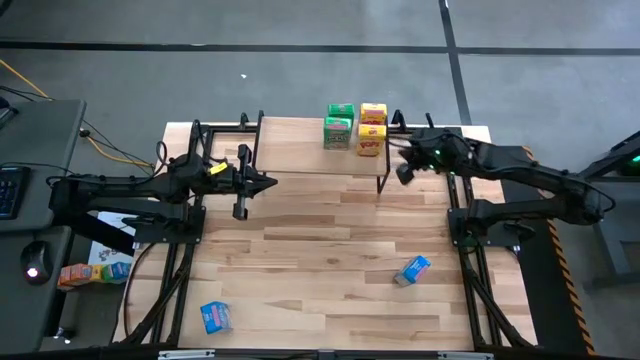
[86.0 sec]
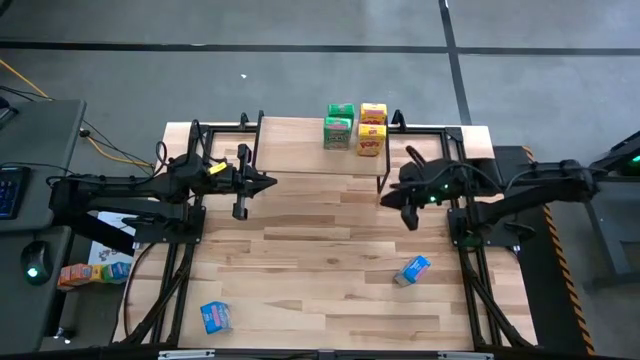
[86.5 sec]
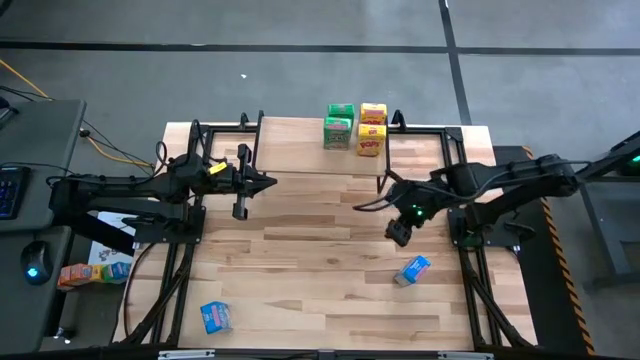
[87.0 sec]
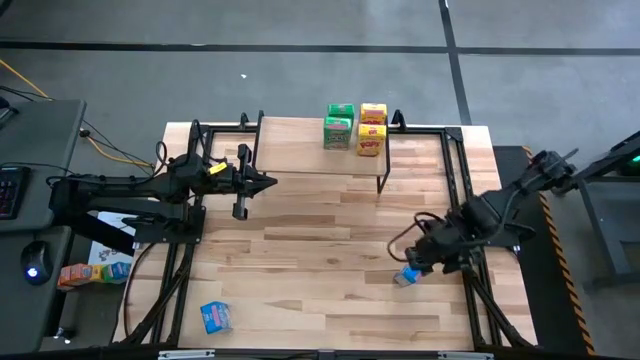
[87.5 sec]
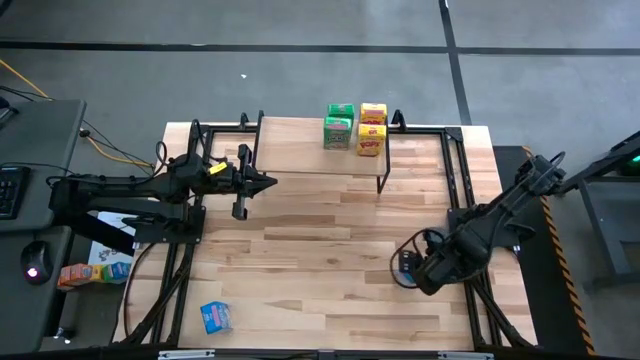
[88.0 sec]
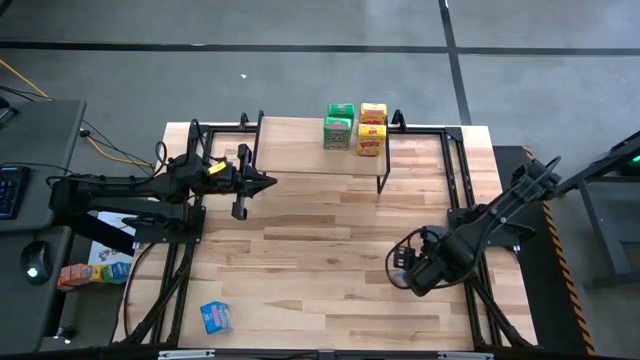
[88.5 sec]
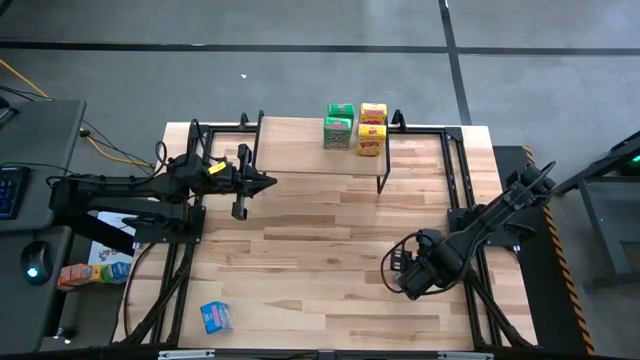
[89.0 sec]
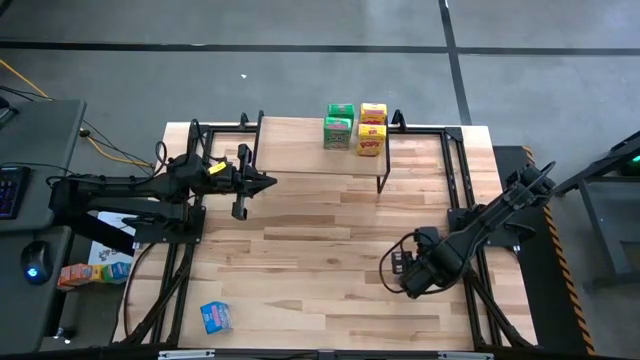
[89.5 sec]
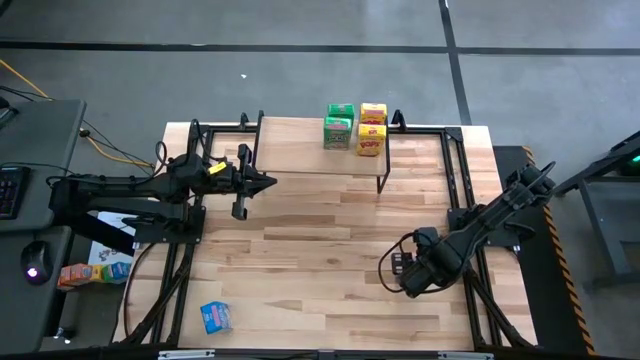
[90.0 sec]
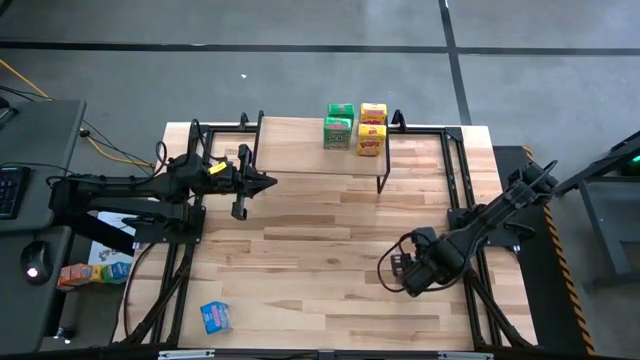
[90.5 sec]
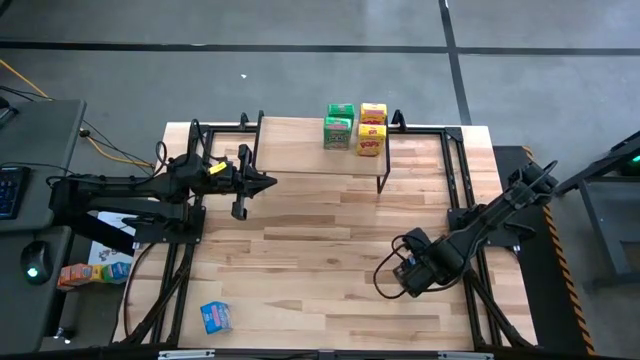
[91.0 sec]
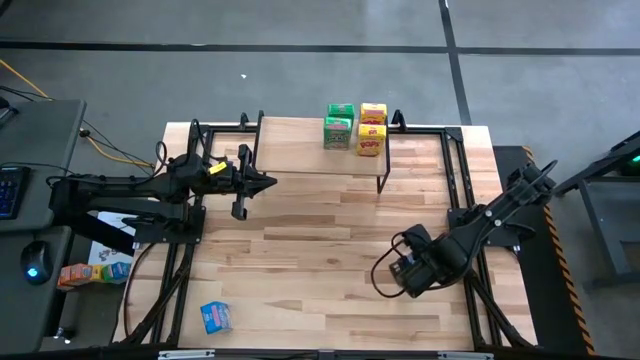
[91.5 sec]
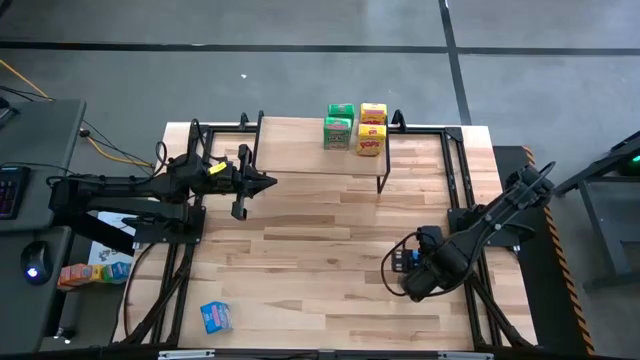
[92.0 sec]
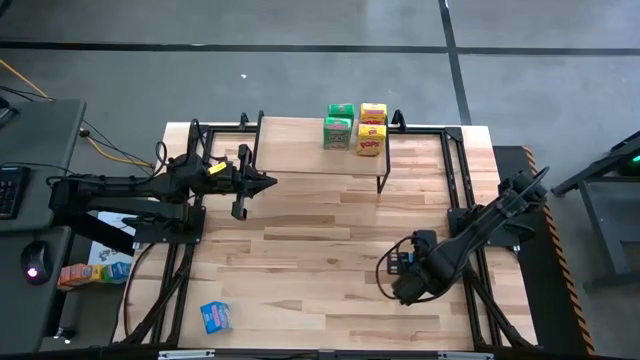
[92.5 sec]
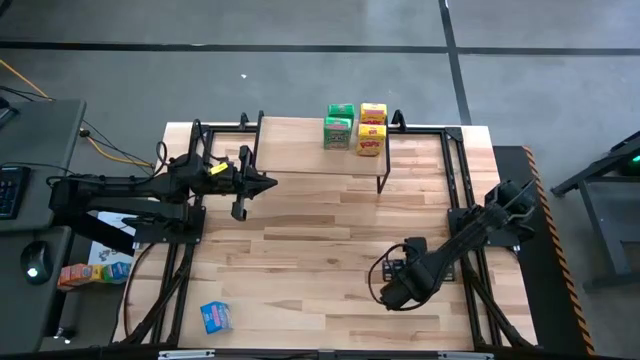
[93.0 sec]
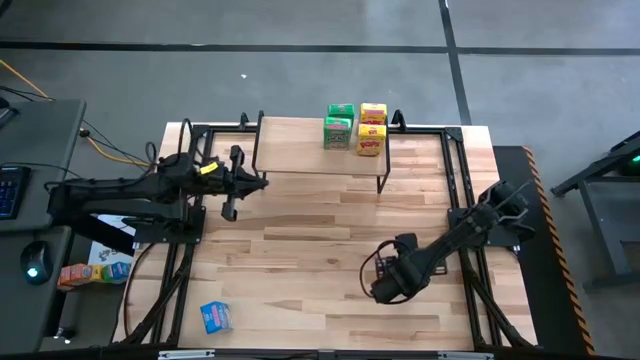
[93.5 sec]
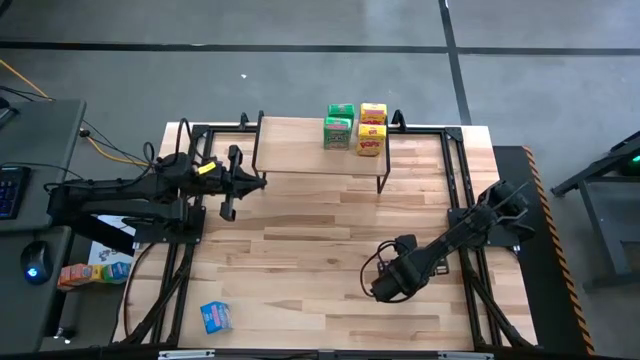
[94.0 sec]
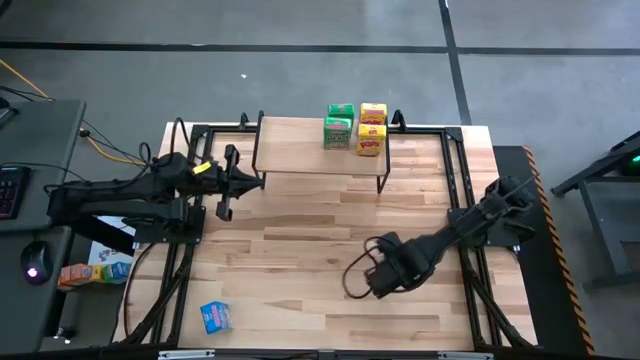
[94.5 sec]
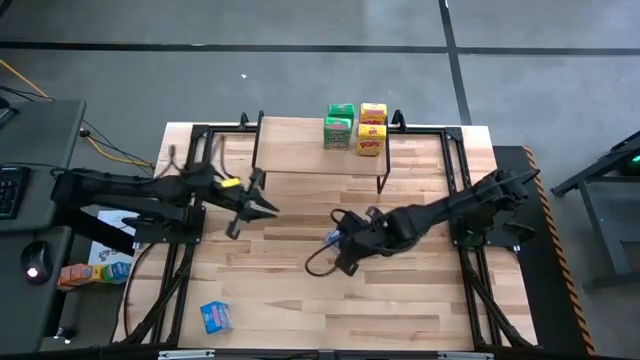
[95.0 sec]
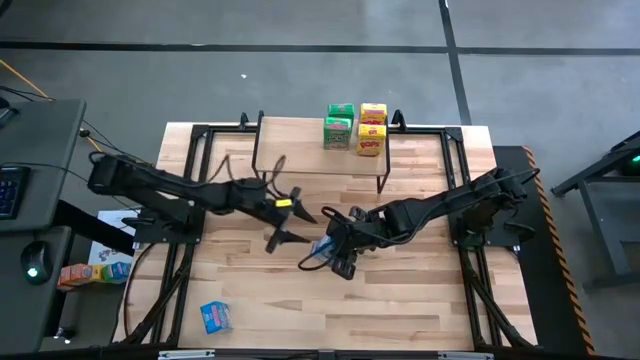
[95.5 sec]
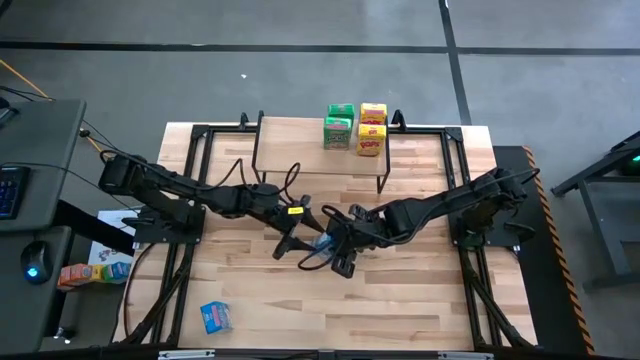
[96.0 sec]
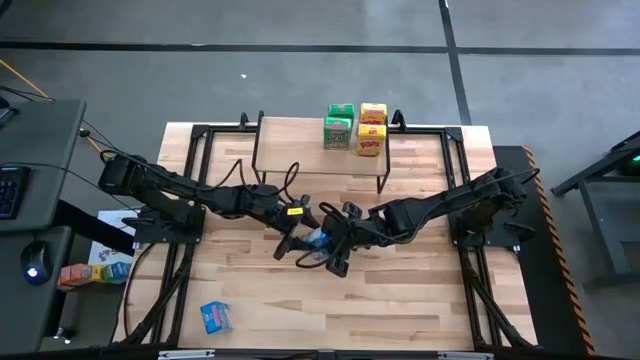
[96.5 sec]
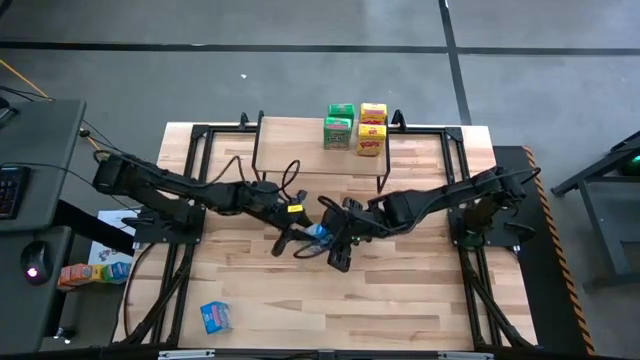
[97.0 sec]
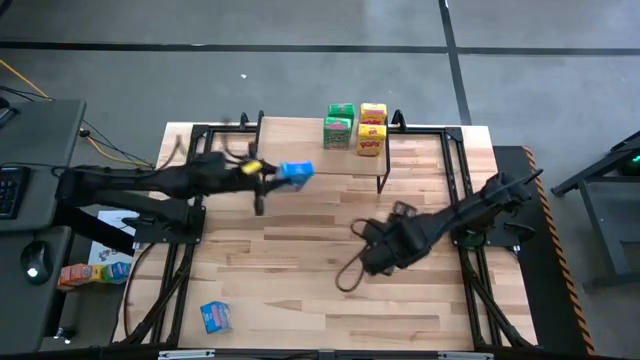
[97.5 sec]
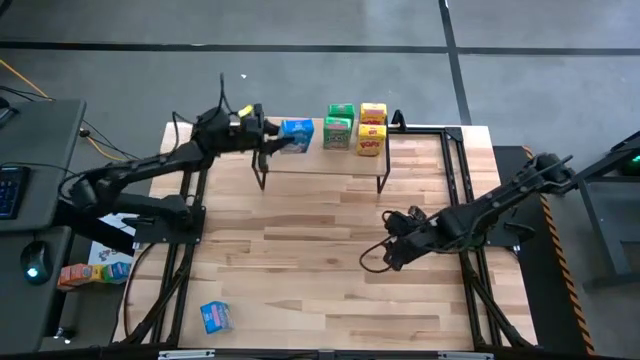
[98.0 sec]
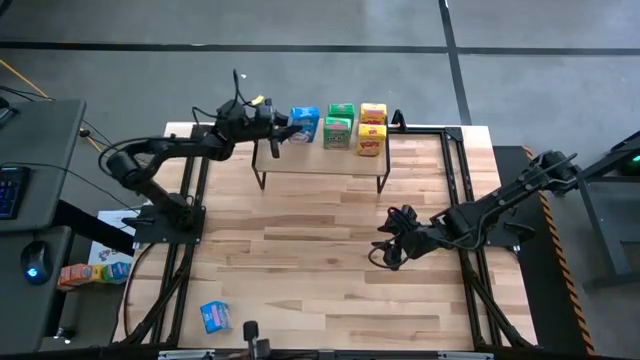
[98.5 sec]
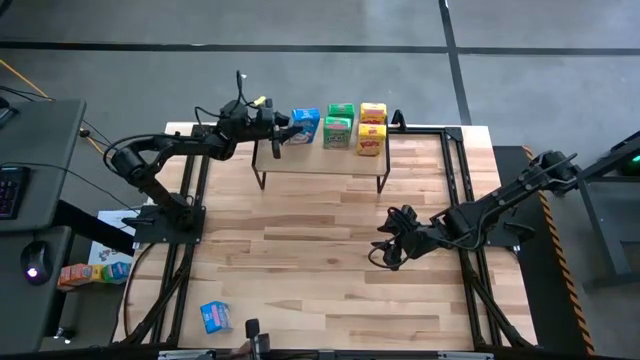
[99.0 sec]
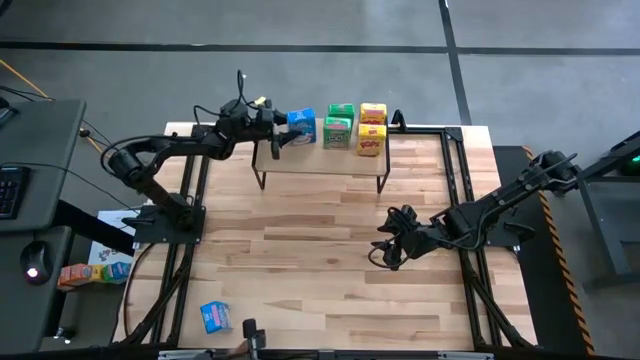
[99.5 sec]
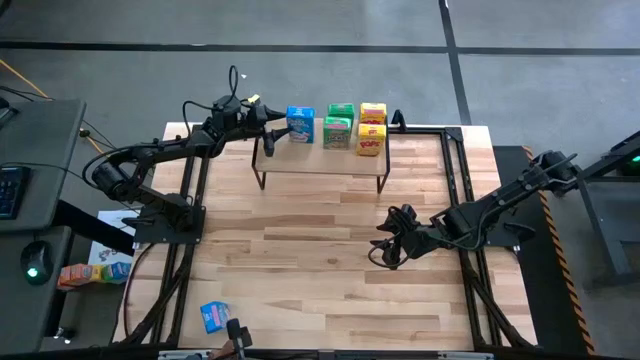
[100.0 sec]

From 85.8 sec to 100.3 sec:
Task: Stack cereal on shelf
Put the right blue cereal box on the shelf

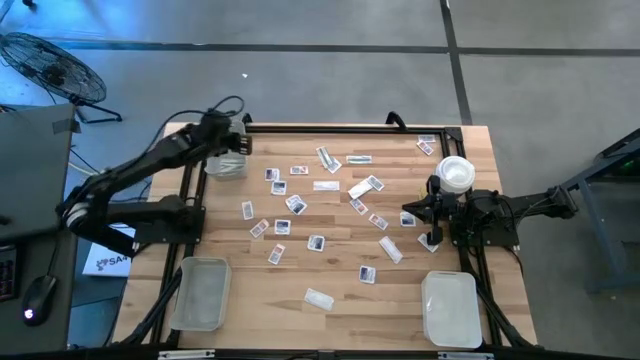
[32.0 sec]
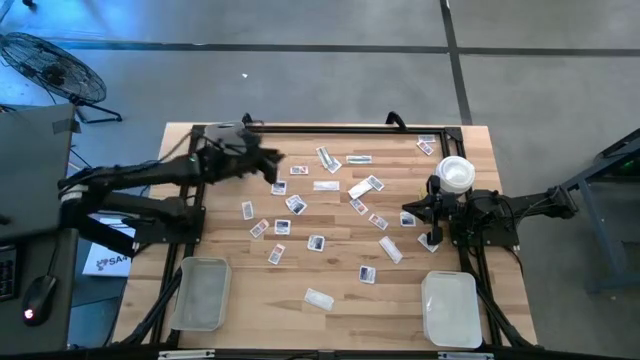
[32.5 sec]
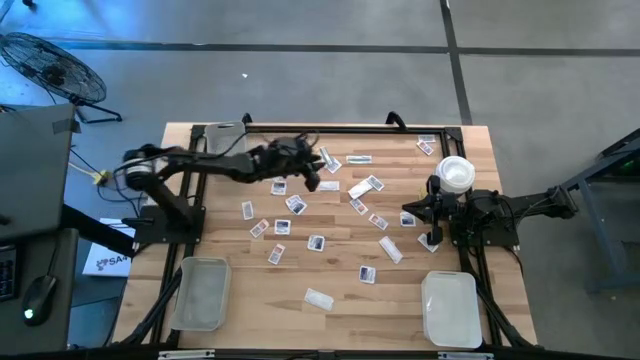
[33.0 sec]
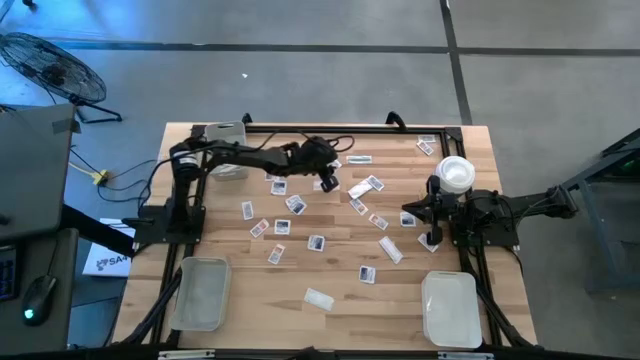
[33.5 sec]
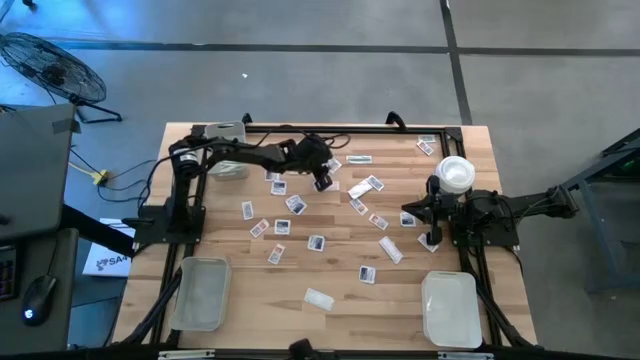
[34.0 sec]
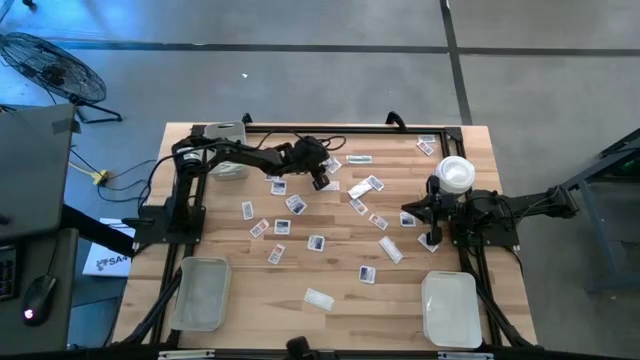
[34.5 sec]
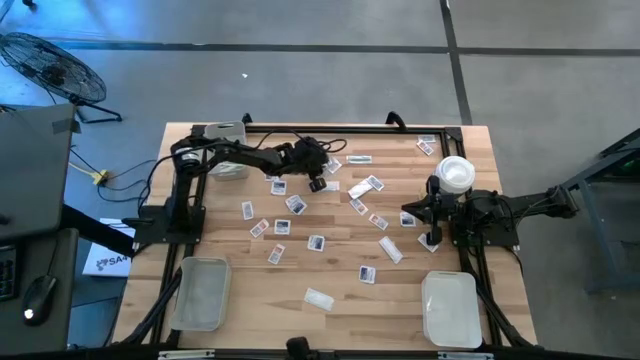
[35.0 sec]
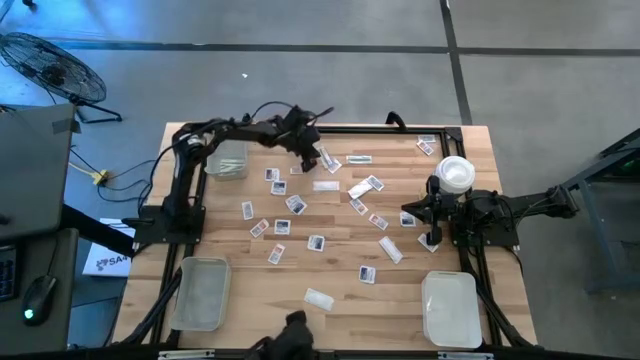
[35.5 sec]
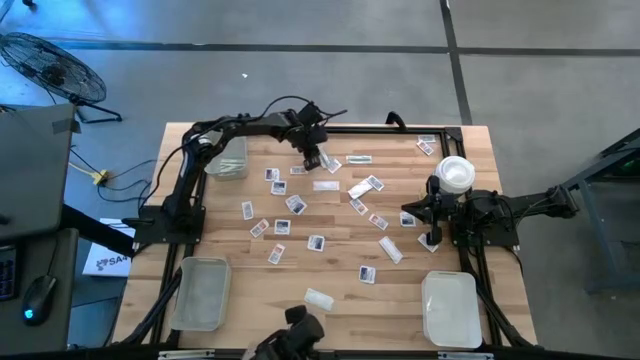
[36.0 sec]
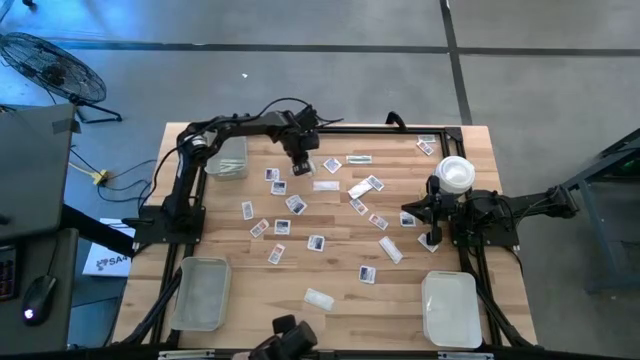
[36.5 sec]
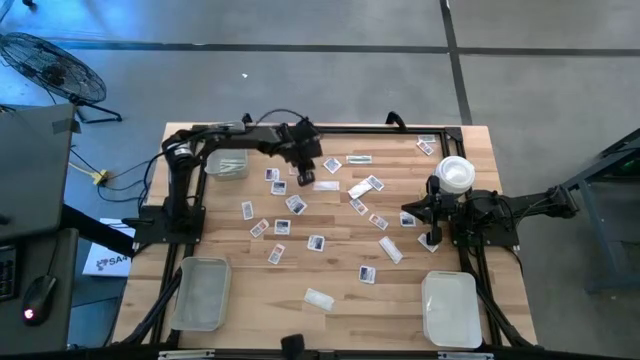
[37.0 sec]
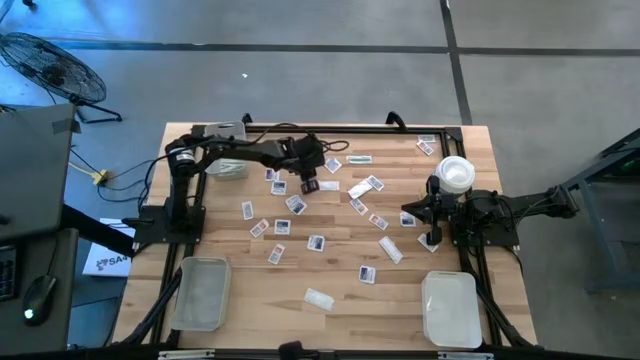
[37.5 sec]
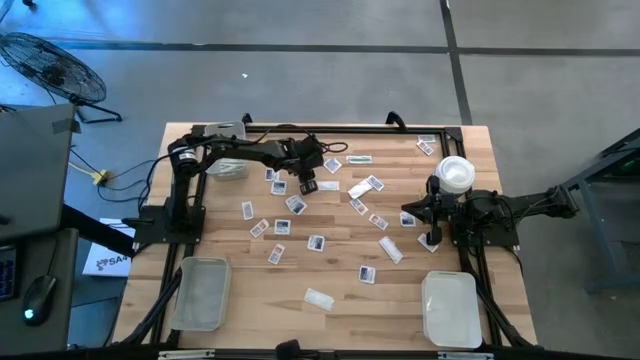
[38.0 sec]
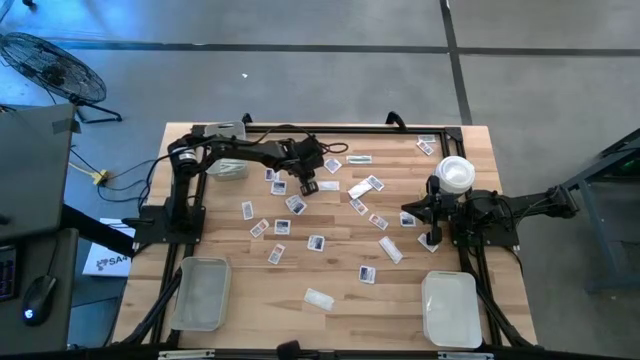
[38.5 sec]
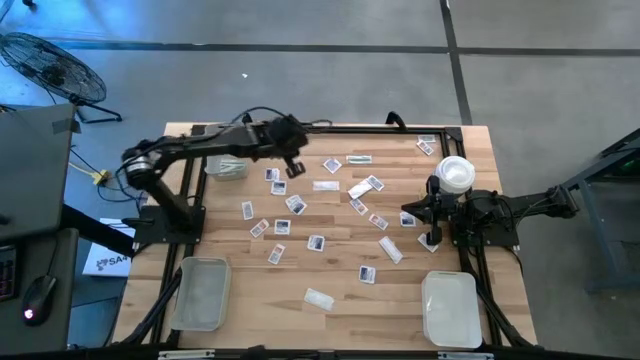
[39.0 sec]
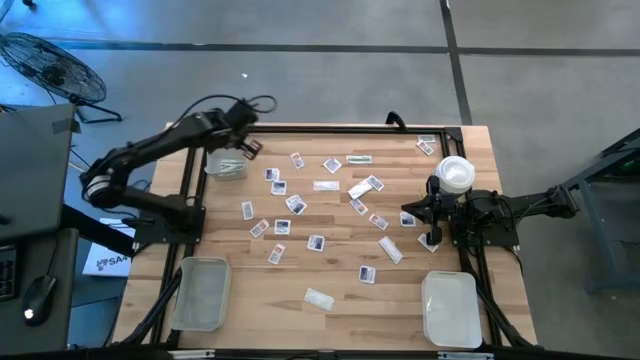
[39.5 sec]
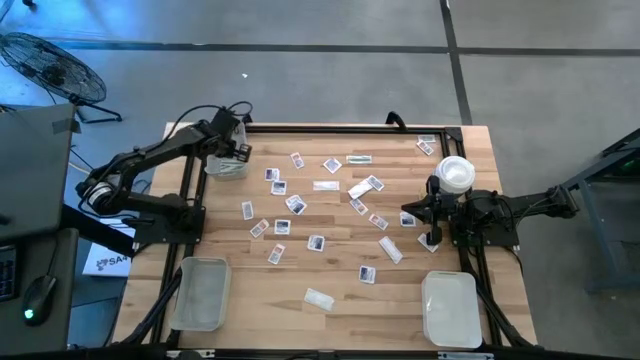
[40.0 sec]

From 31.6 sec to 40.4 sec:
Task: Pick & Place First Aid Supplies
Put the green bandage pack into the top gray bin
